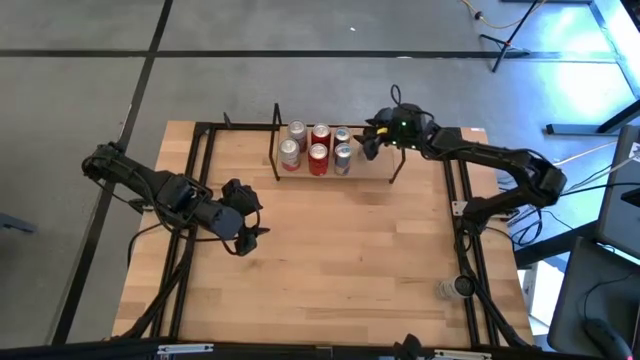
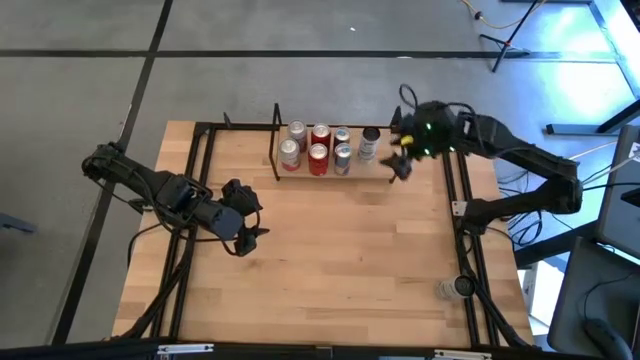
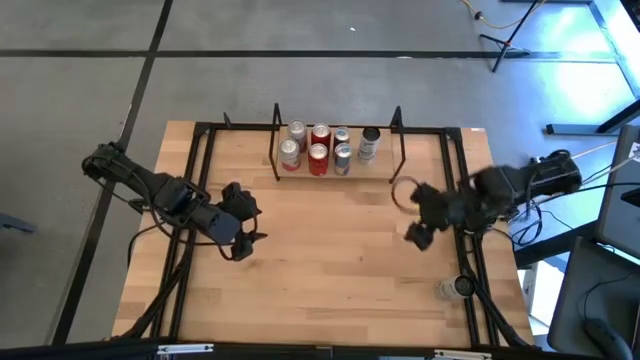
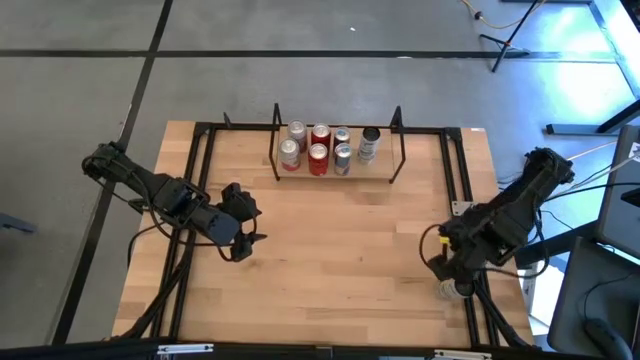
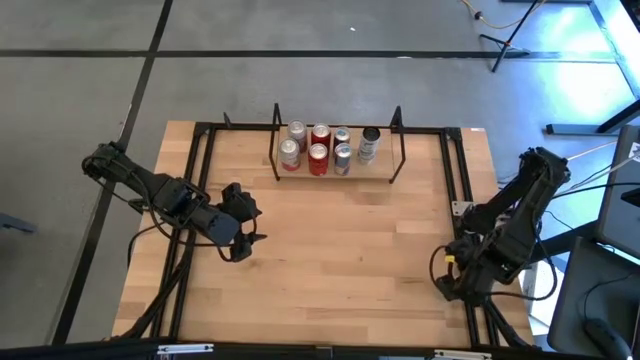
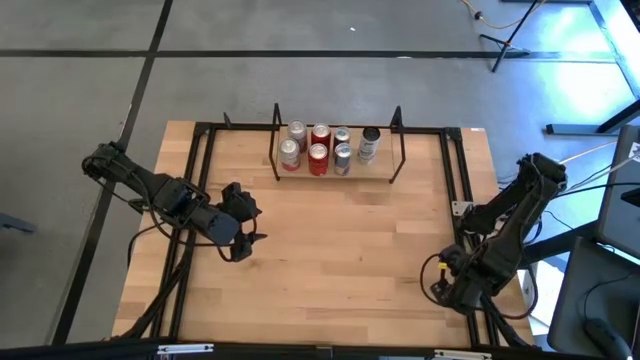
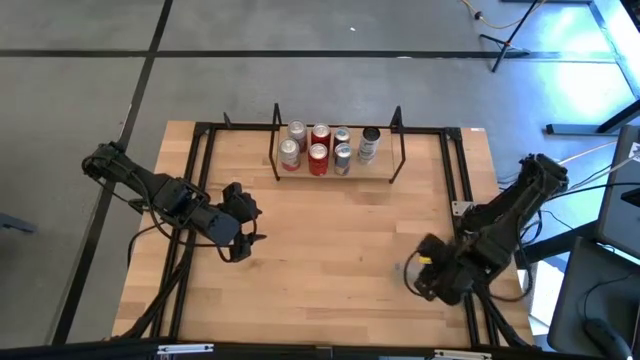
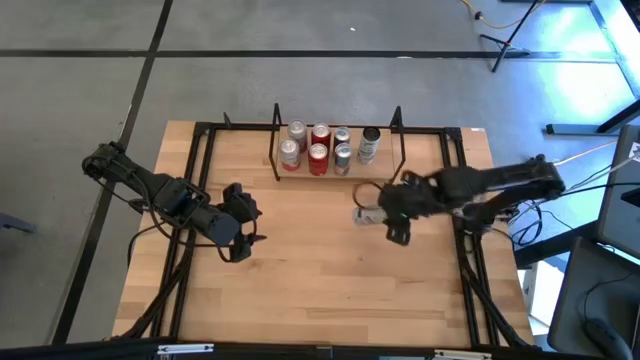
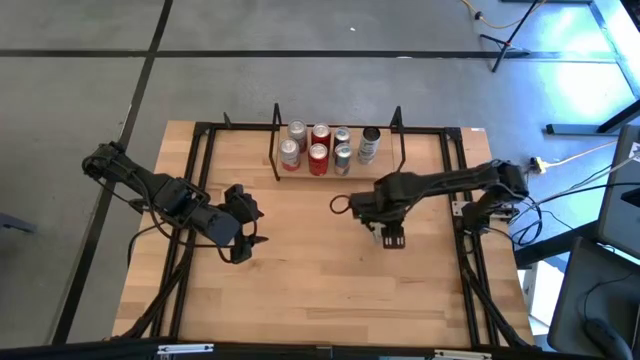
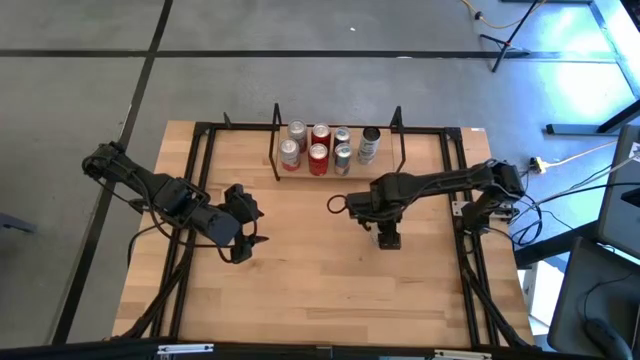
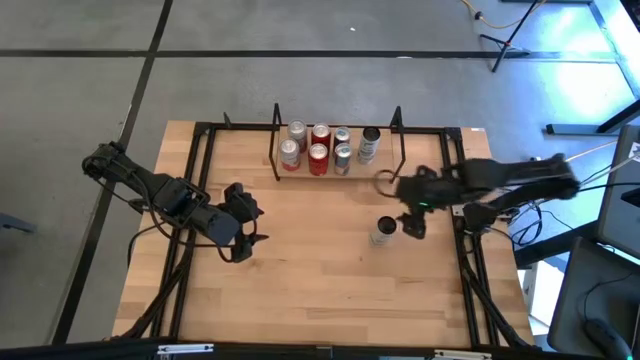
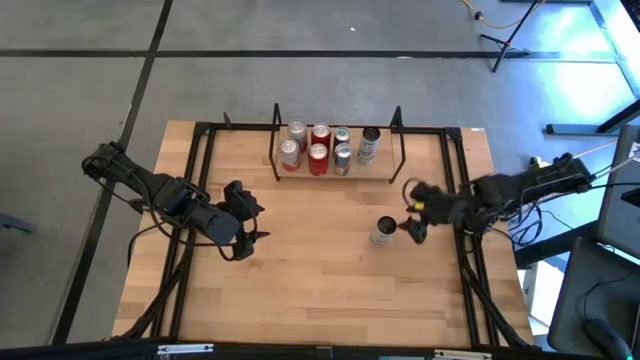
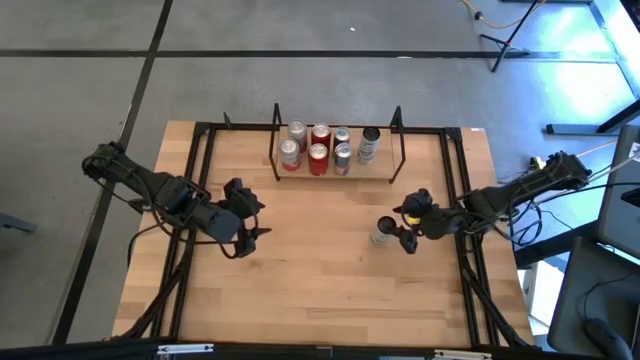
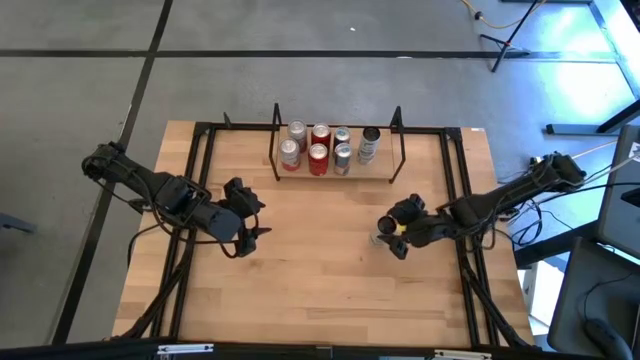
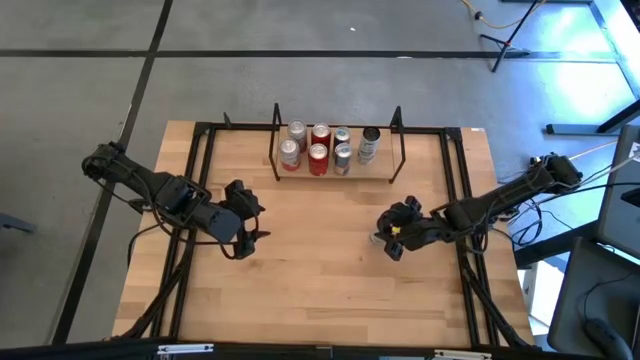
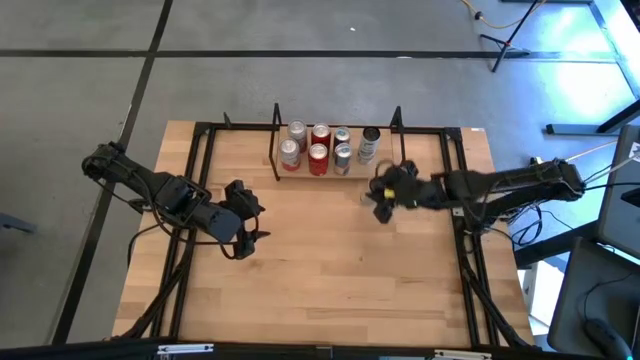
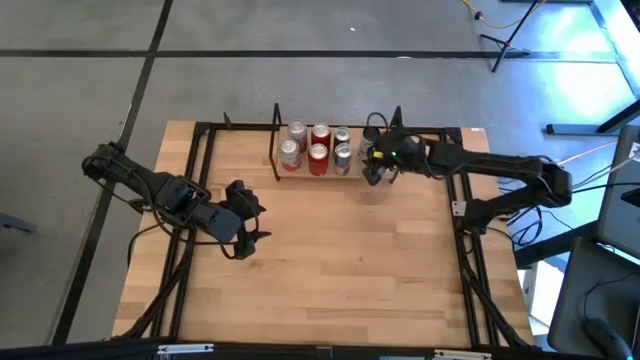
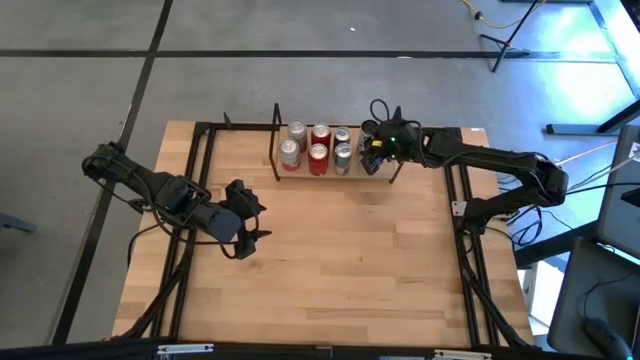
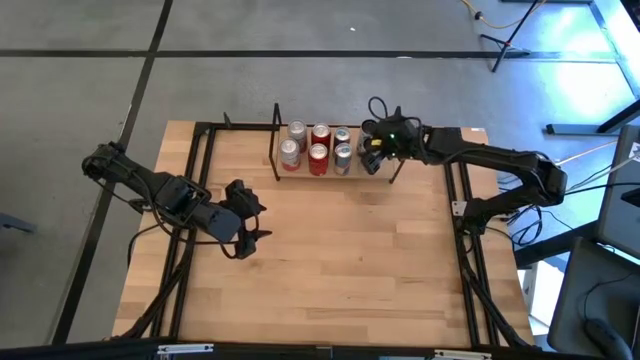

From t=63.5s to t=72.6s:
Task: Place canned beverage on shelf
Put the white soda can on the shelf aligned with the other white soda can

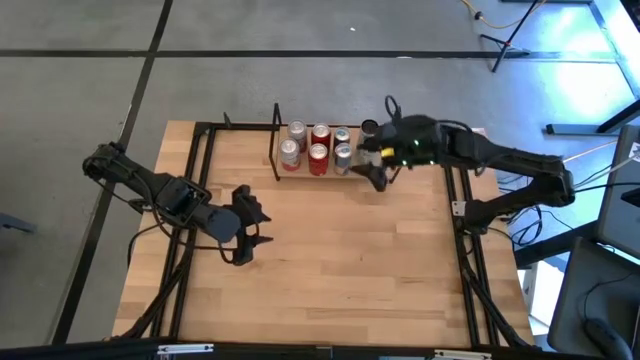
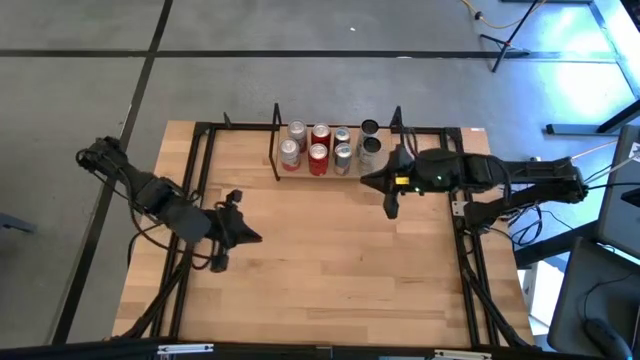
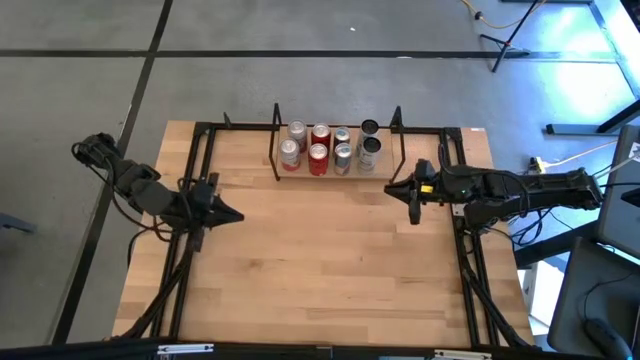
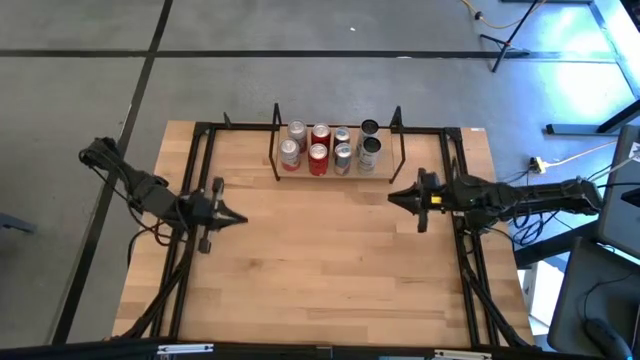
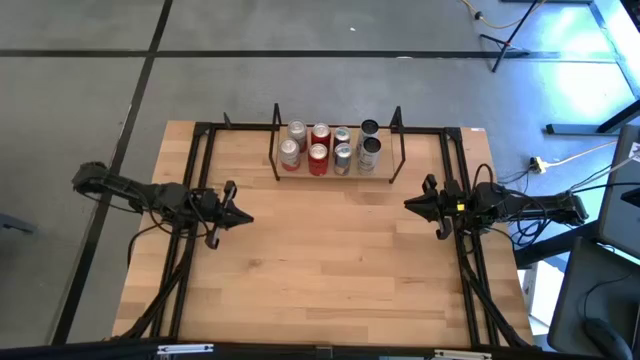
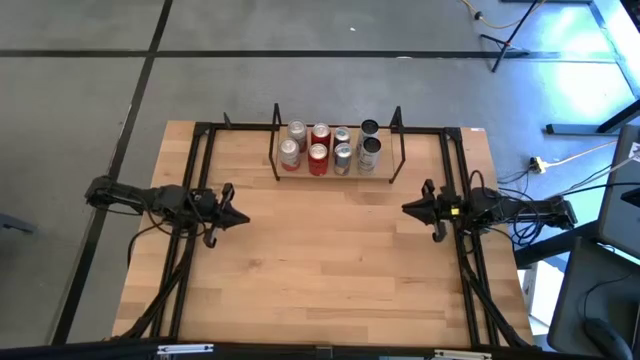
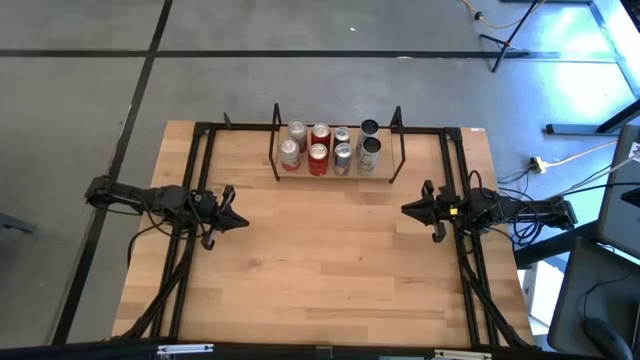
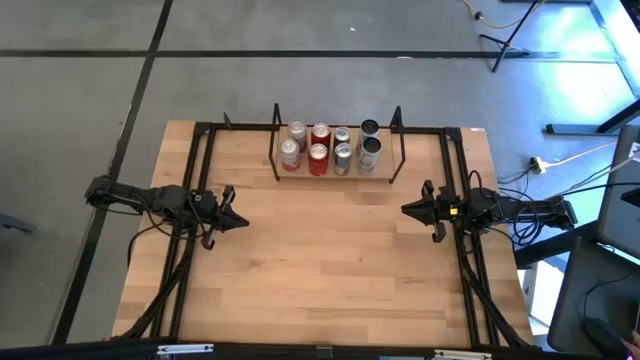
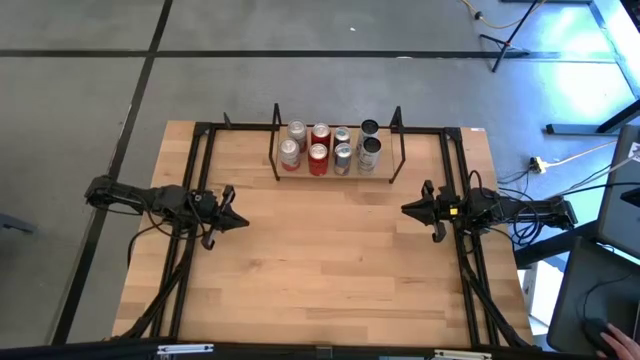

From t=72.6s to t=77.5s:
Return to Home Position

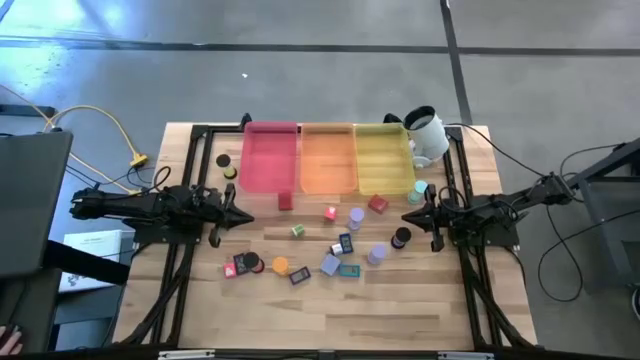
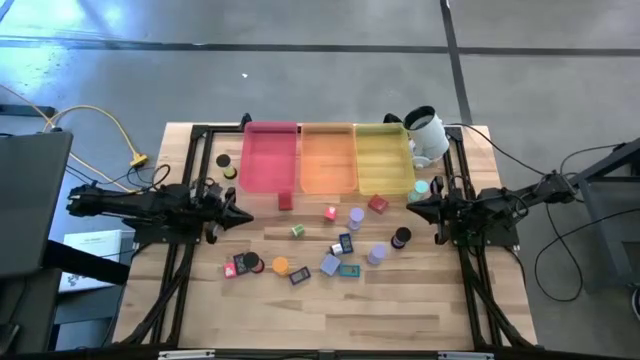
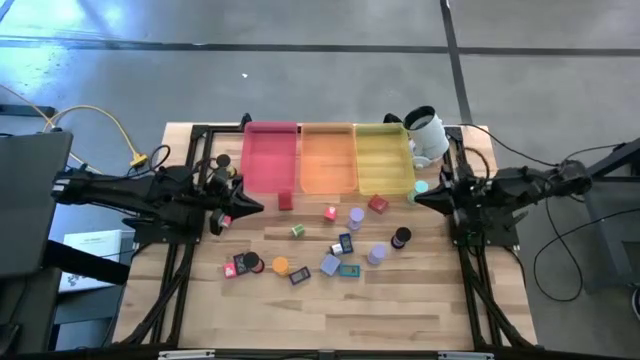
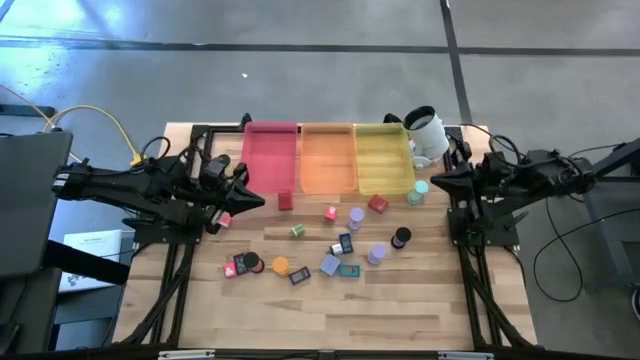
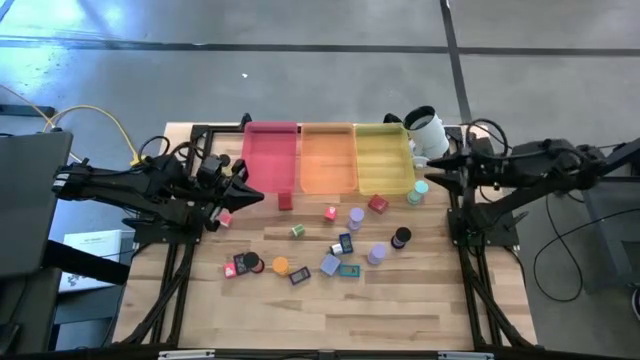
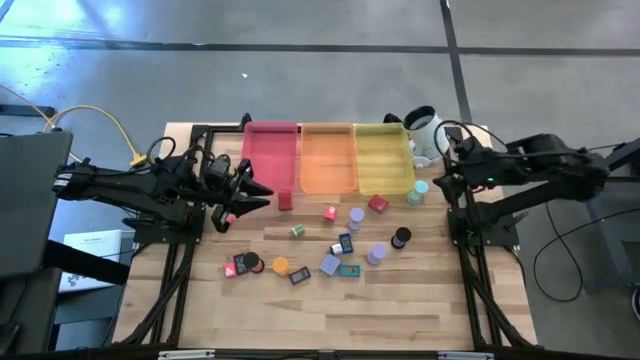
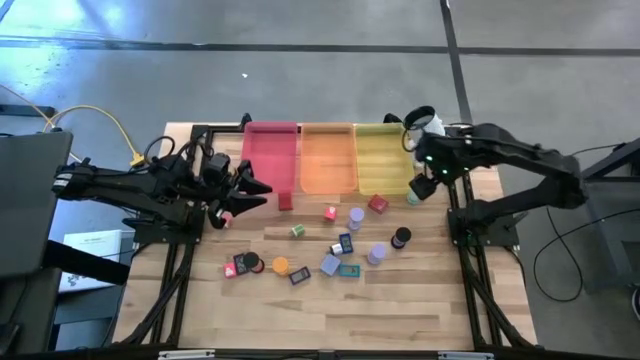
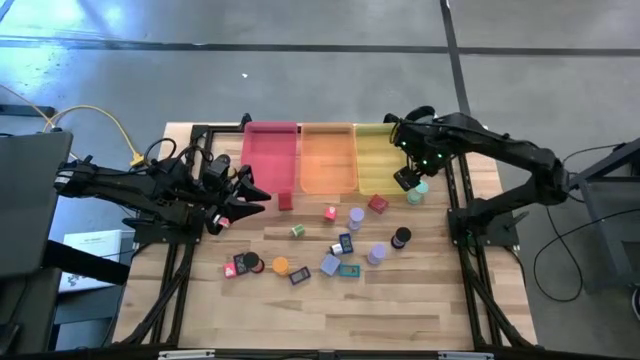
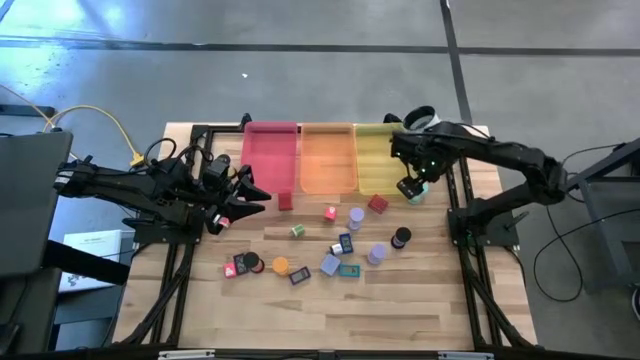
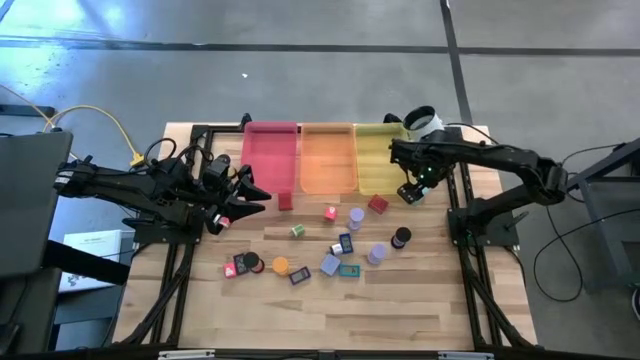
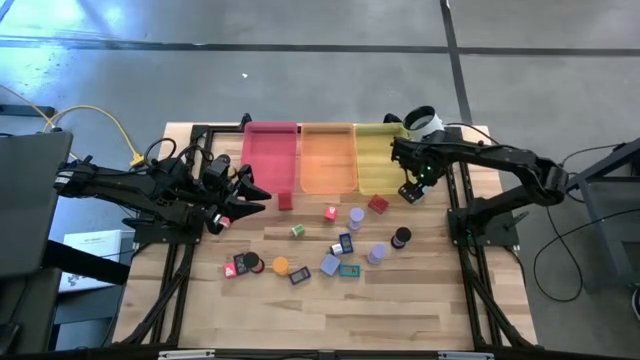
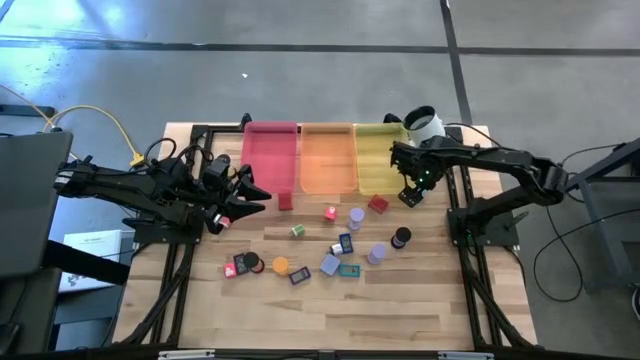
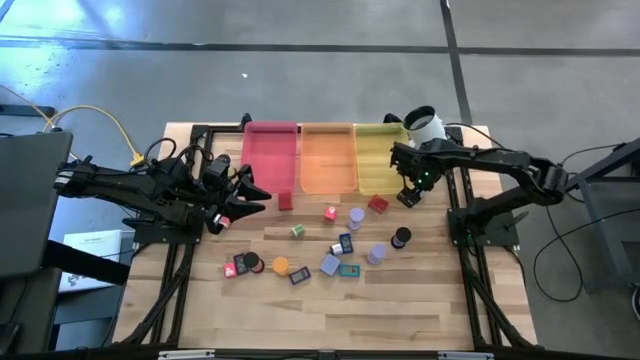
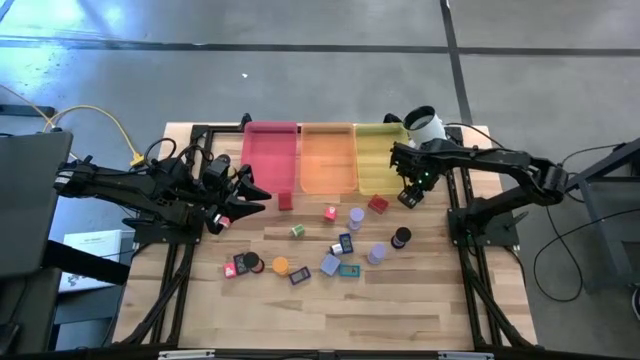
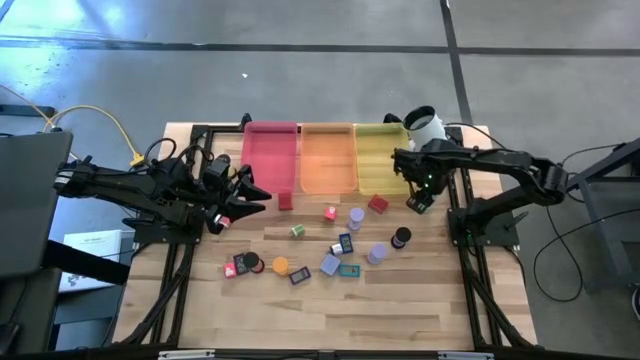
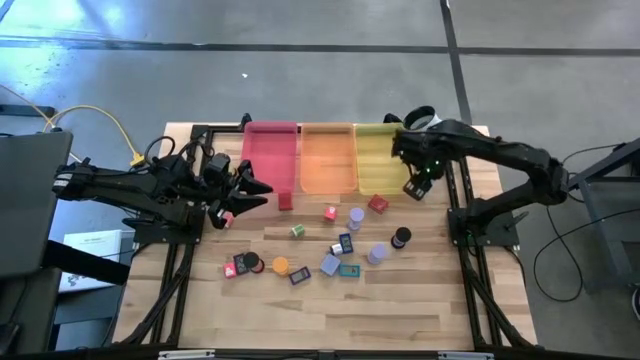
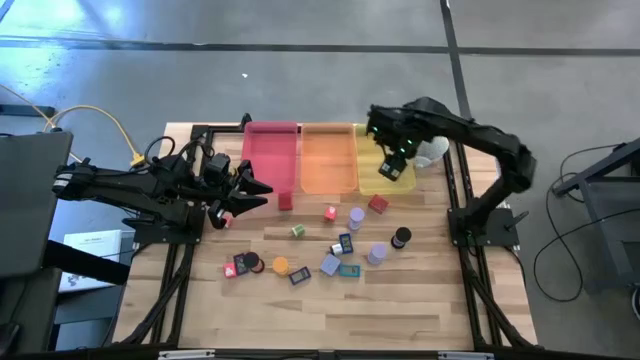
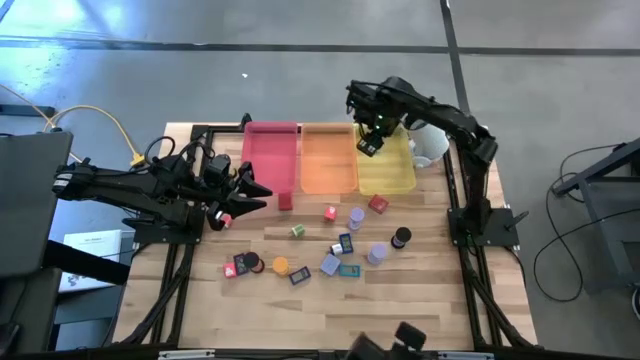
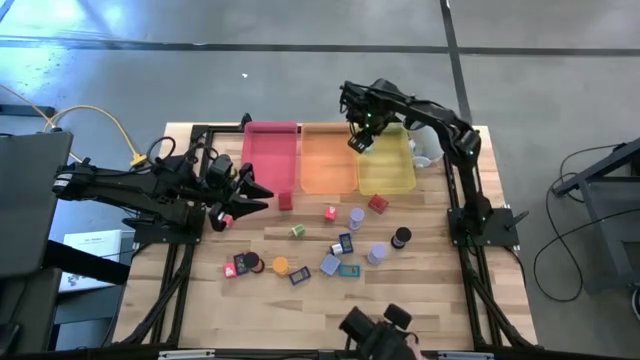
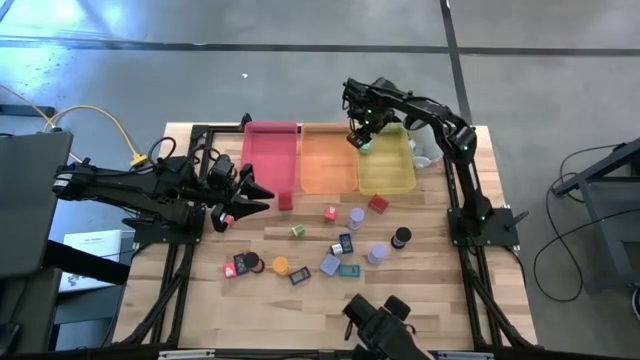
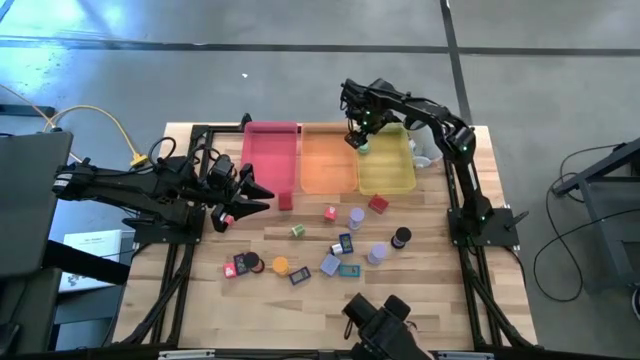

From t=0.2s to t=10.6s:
Task: Pick & Place Office items
Put the blue hourglass into the yellow bin
